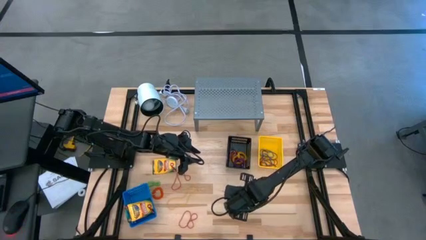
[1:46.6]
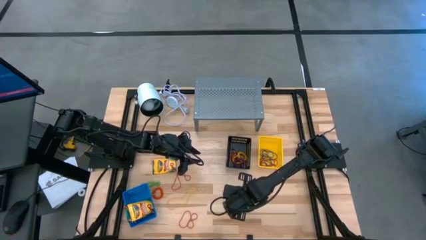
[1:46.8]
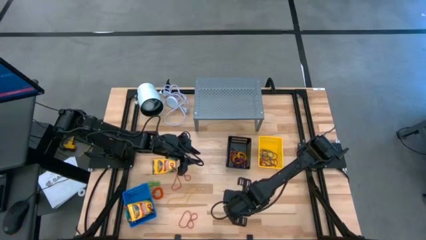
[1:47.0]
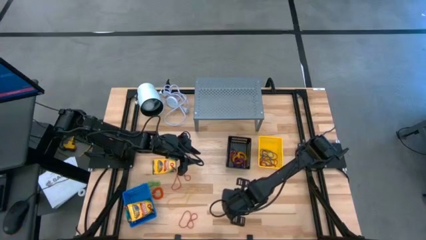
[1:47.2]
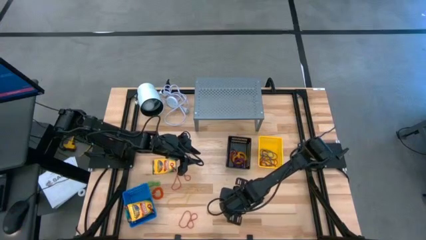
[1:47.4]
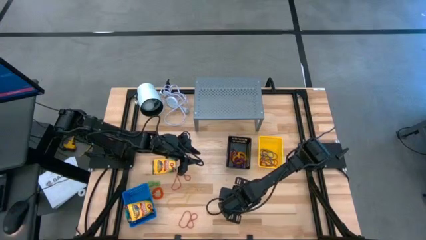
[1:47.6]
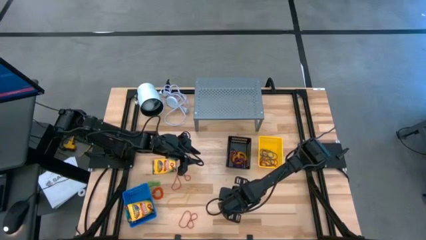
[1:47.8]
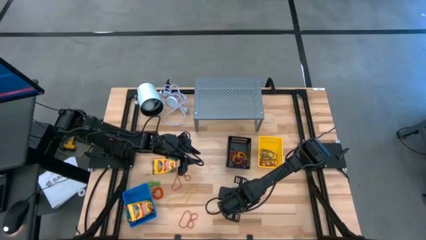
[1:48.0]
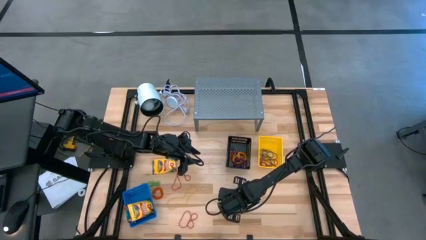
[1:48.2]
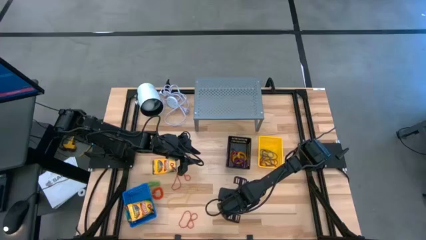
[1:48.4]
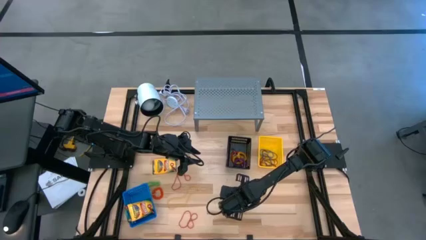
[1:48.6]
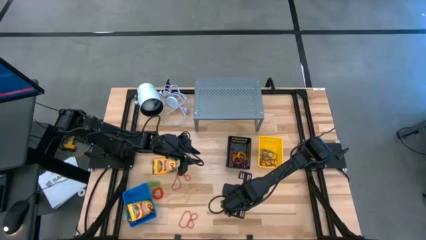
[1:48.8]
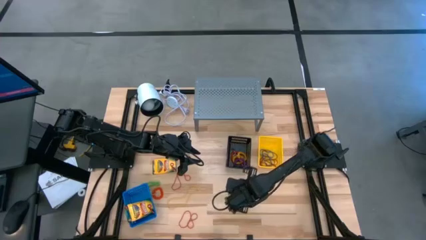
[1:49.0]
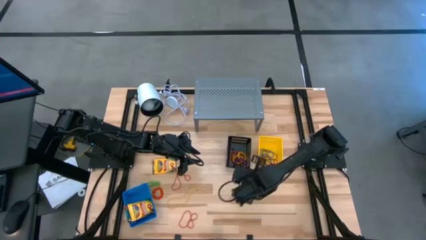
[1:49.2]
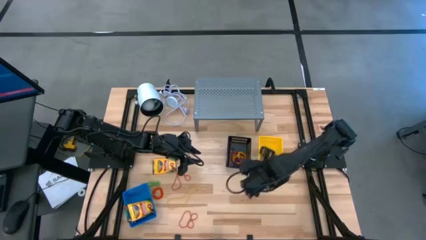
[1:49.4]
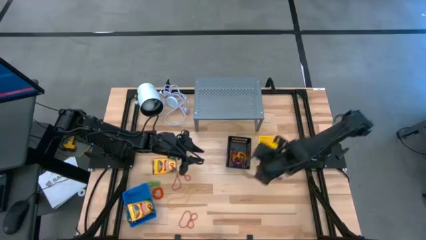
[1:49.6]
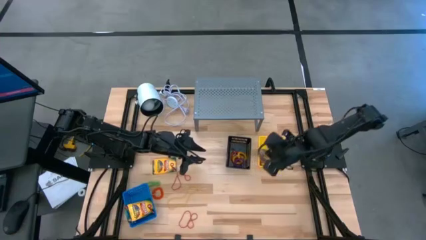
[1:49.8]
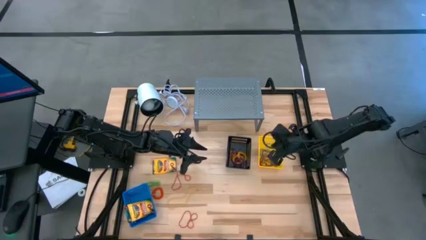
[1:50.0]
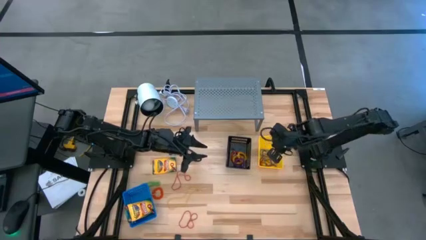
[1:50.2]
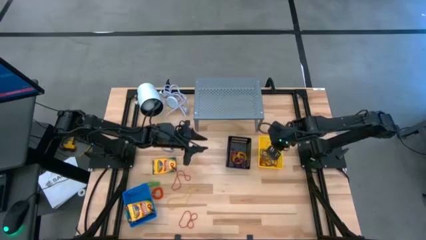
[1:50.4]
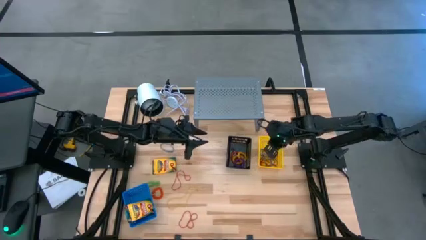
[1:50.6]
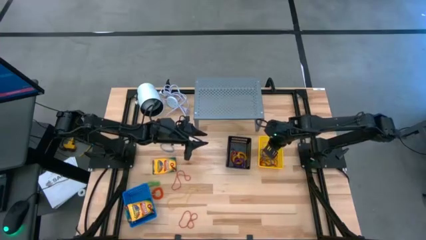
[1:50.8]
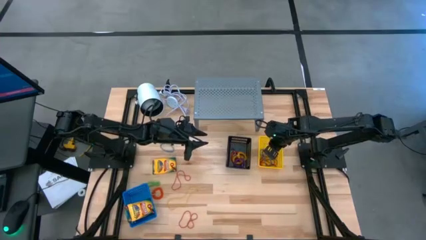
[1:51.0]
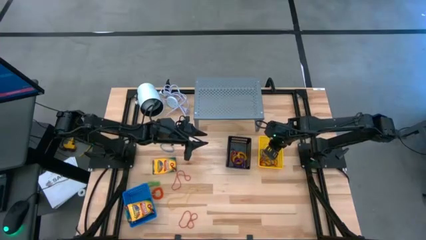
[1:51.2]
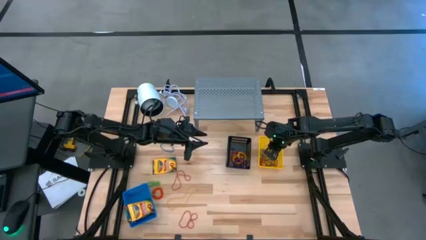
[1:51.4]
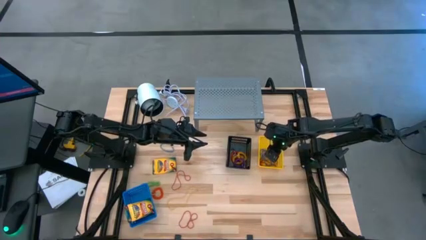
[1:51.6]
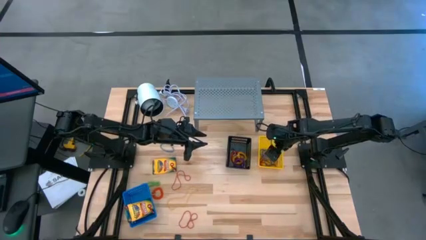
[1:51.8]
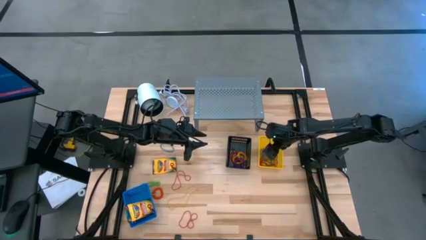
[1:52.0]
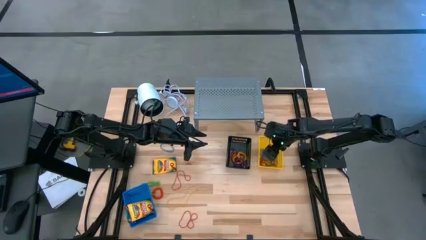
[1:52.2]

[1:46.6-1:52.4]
Task: Pick & Place Office Desk Supplies
Put the blue rubber band into the yellow basket

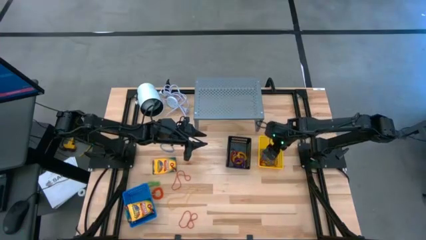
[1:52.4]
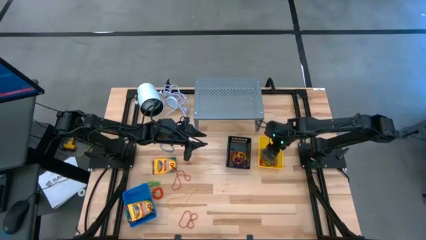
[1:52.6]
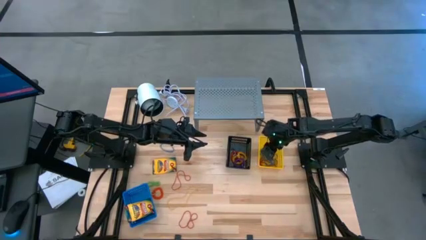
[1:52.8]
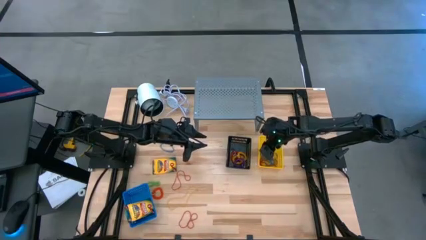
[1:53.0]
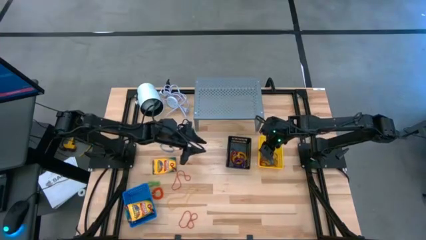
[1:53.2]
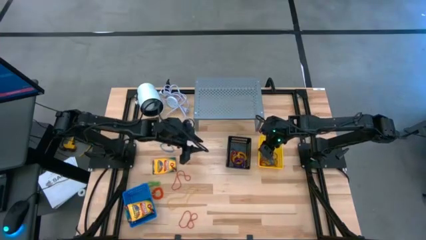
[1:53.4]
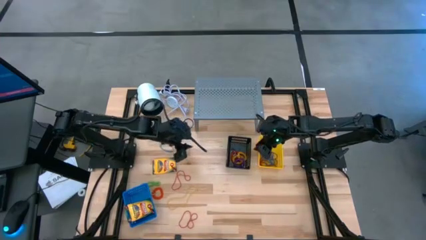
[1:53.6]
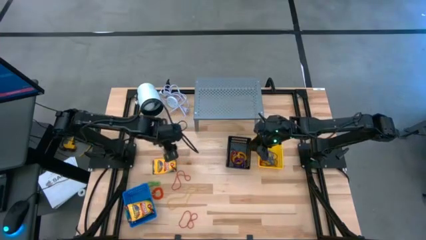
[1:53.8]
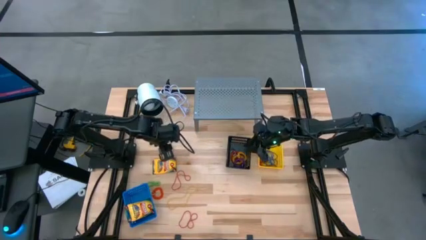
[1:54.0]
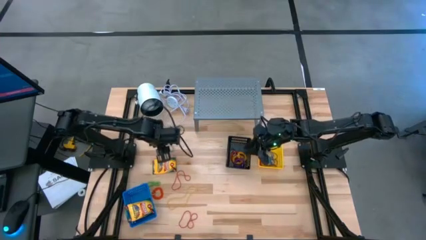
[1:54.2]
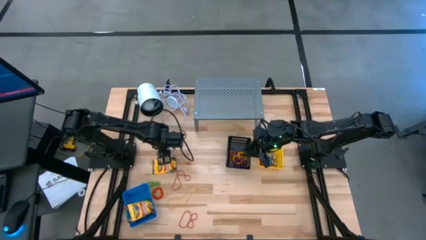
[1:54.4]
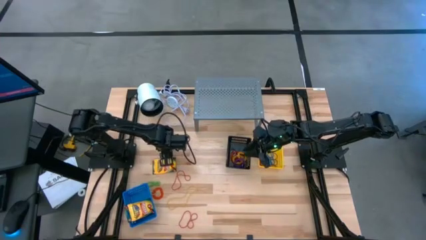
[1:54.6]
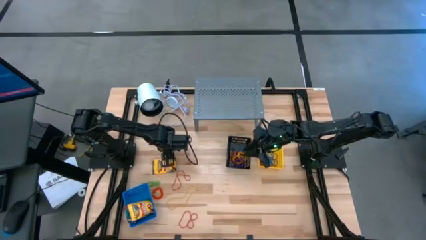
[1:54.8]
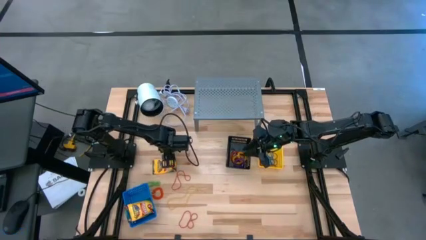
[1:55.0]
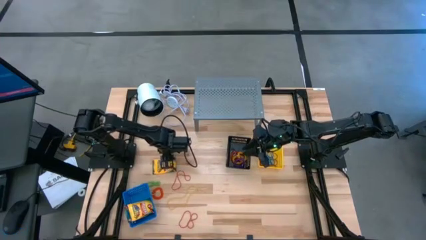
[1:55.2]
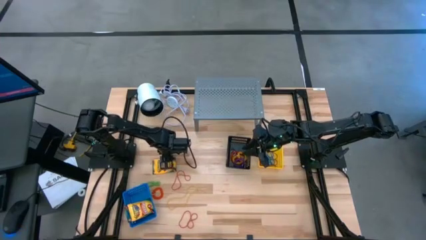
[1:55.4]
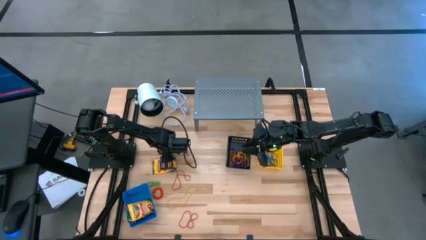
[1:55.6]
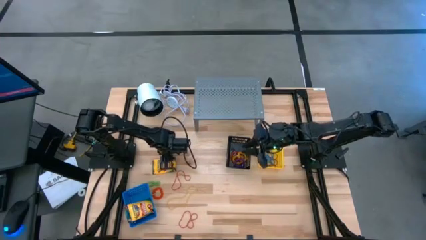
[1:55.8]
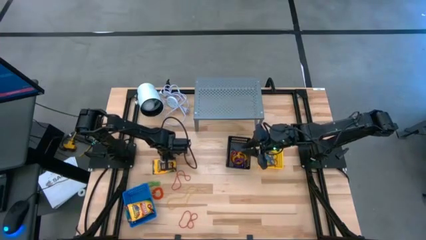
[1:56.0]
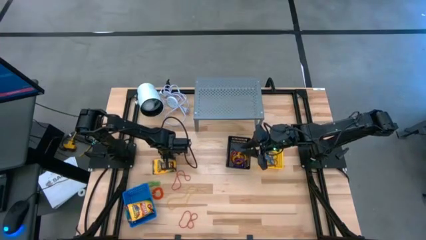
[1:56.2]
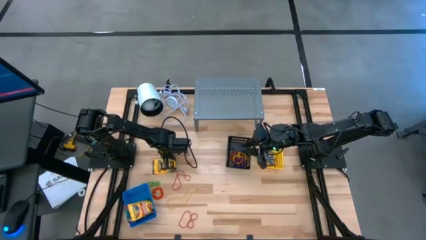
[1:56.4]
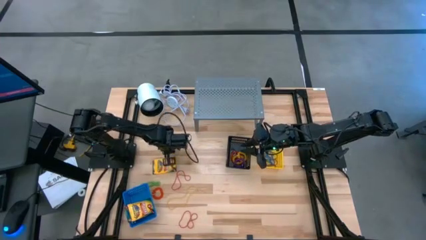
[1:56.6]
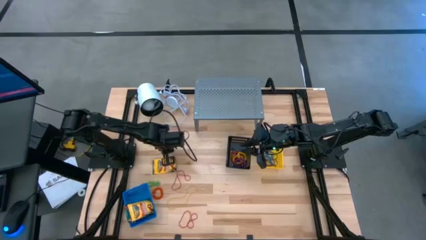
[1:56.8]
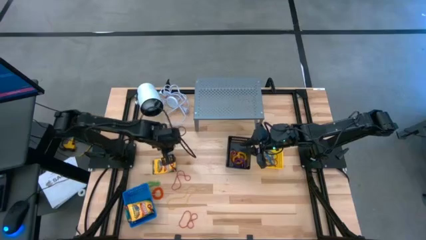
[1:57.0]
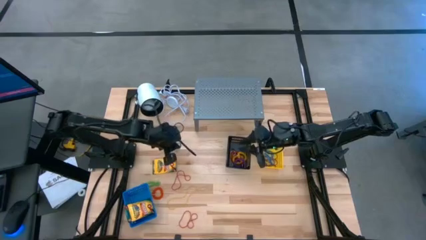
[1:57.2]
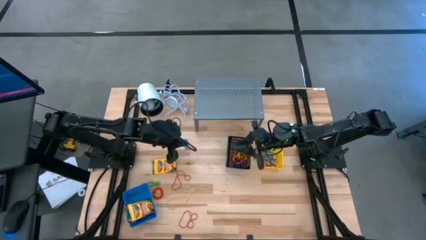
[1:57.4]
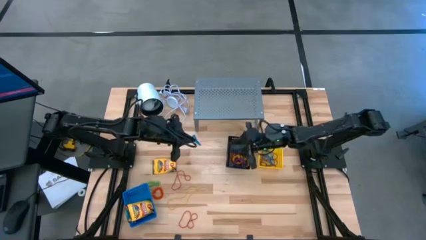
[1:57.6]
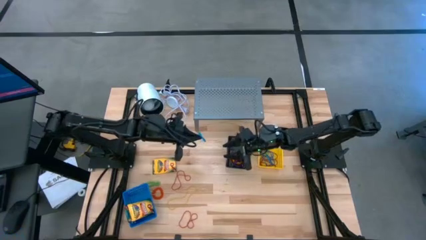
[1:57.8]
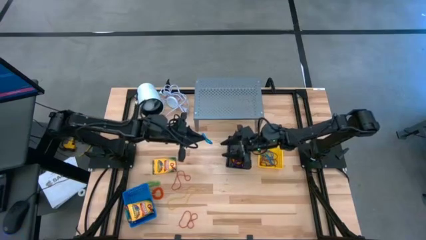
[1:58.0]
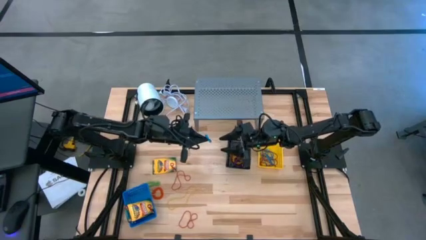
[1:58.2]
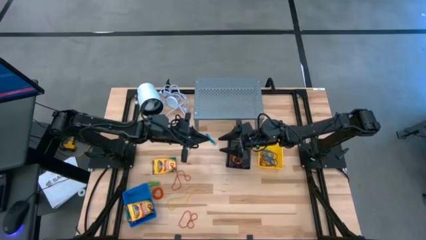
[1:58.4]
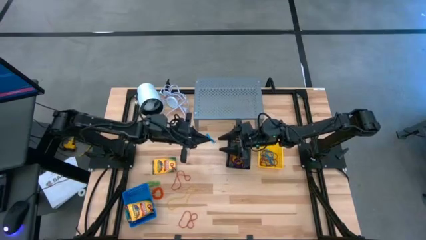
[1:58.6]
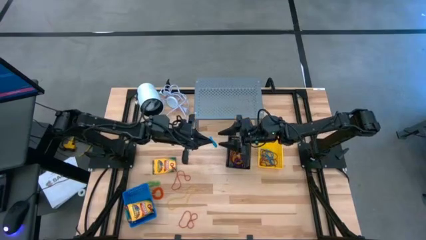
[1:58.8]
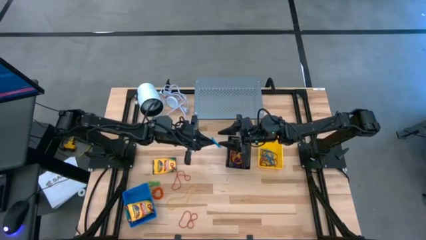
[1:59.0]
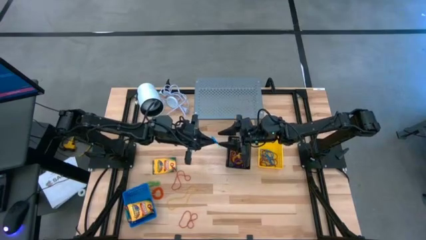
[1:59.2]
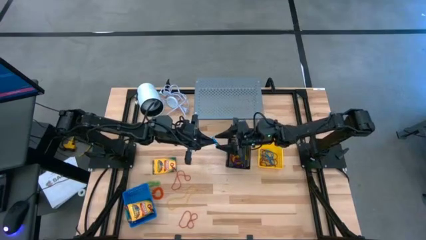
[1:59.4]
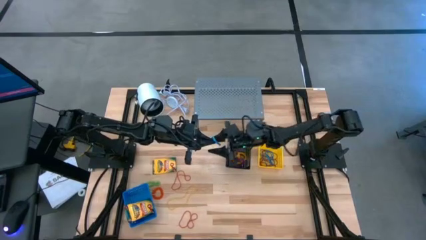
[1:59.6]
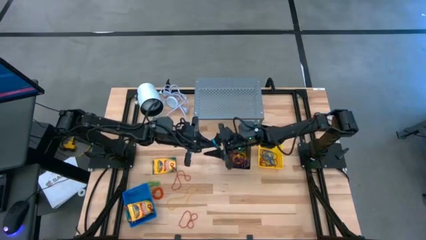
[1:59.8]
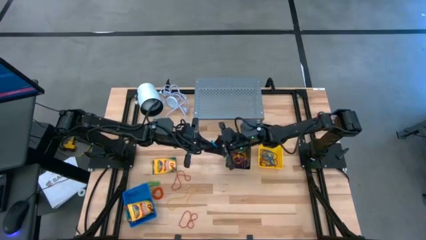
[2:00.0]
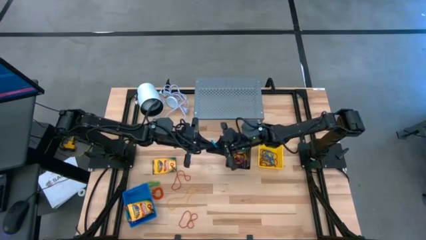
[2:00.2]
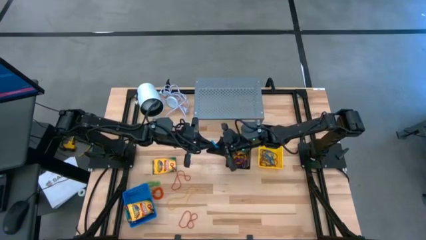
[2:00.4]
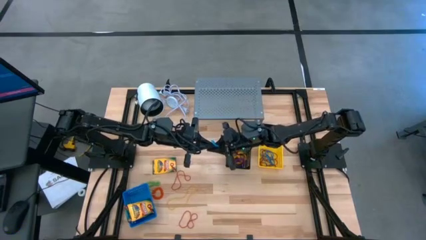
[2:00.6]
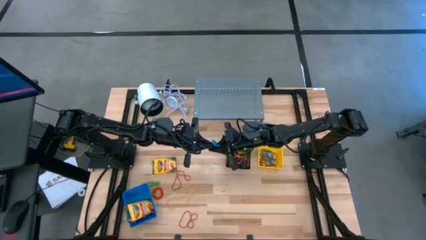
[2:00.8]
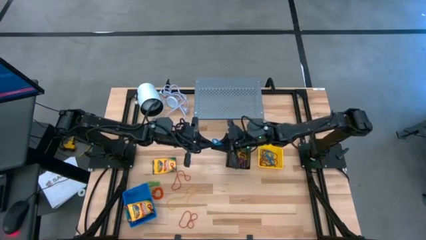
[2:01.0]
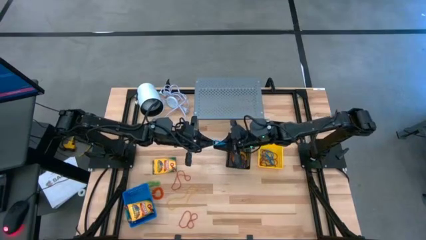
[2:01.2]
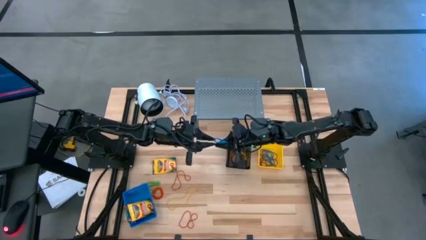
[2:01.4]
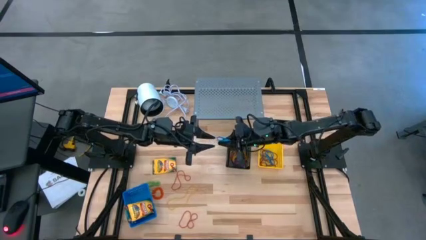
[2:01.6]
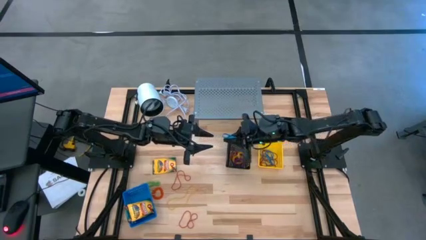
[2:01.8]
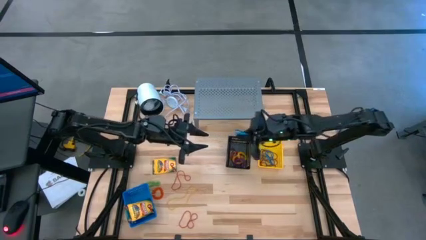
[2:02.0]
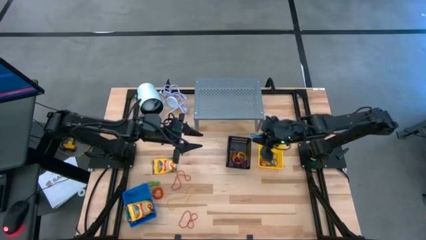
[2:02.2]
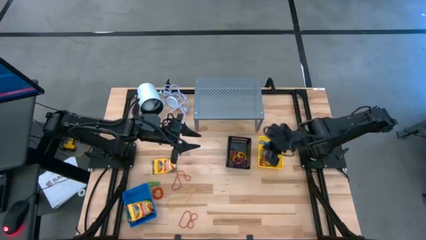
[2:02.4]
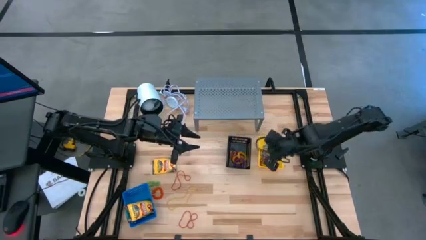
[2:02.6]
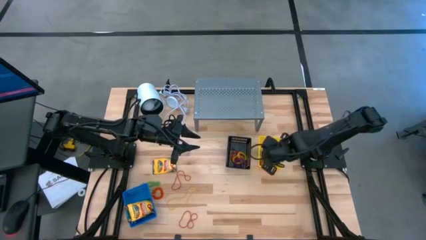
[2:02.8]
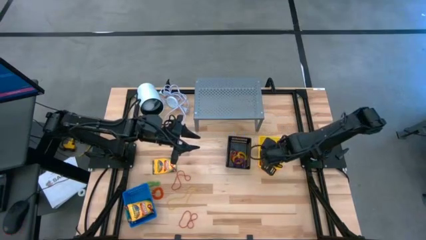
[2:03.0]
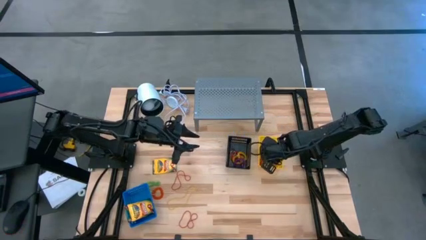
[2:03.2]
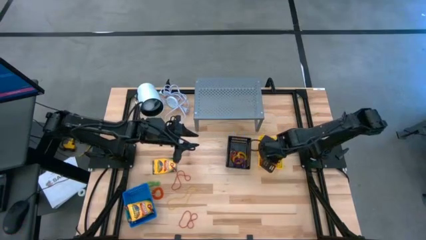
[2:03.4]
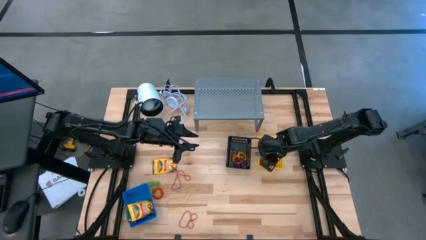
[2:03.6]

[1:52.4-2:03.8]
Put the blue rubber band into the yellow basket
